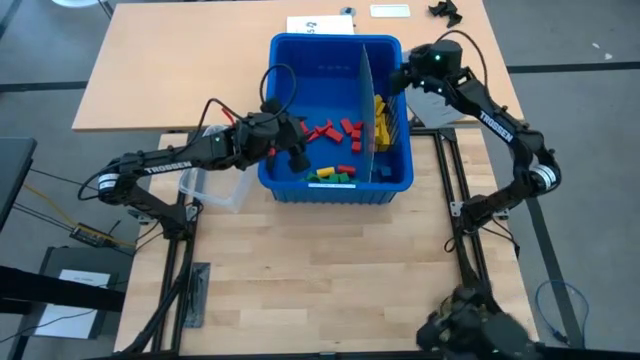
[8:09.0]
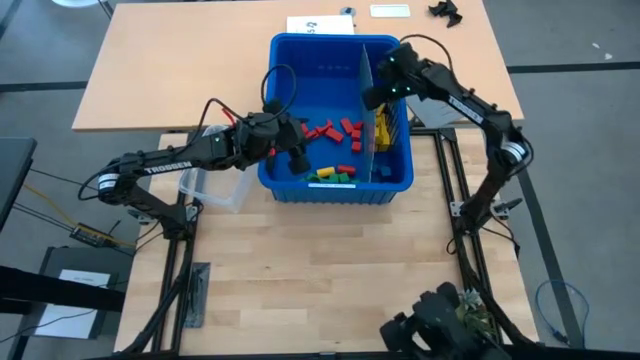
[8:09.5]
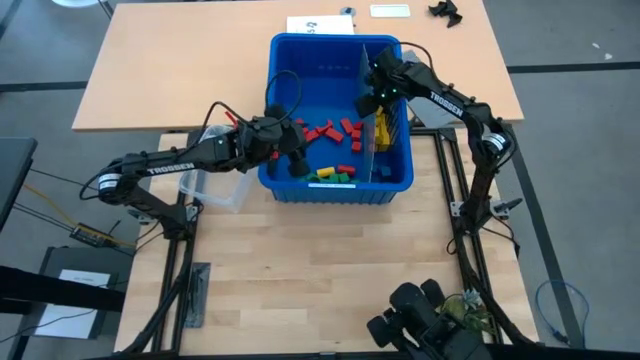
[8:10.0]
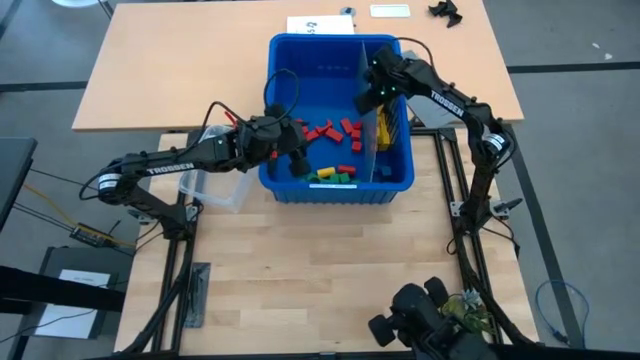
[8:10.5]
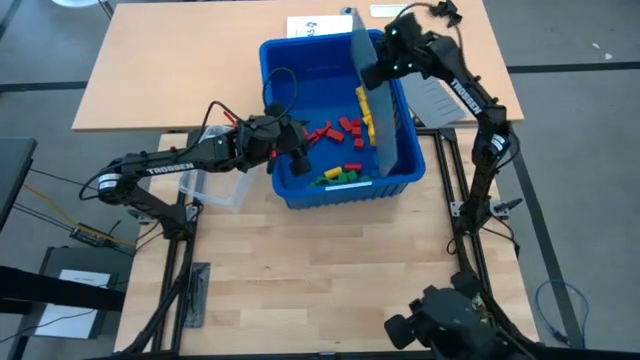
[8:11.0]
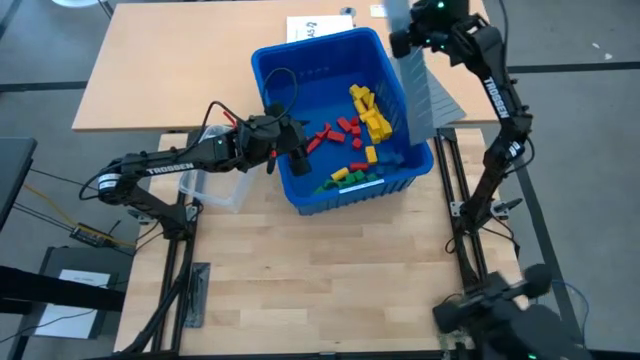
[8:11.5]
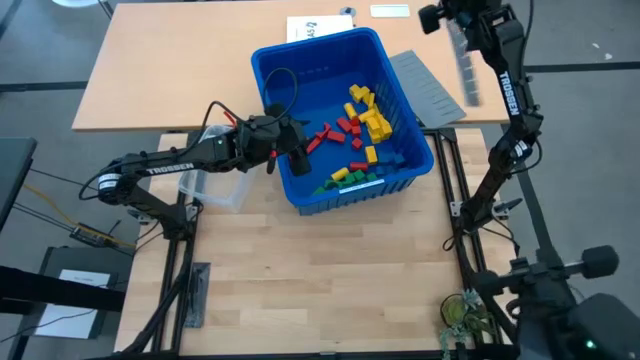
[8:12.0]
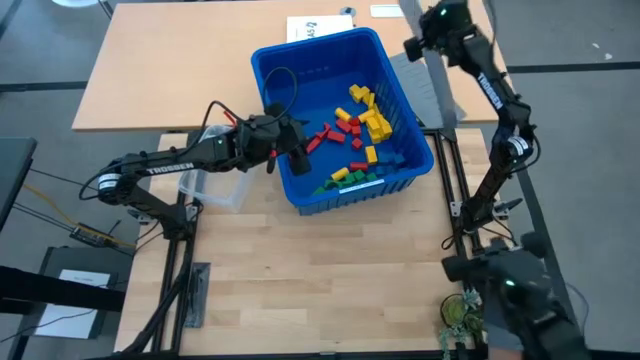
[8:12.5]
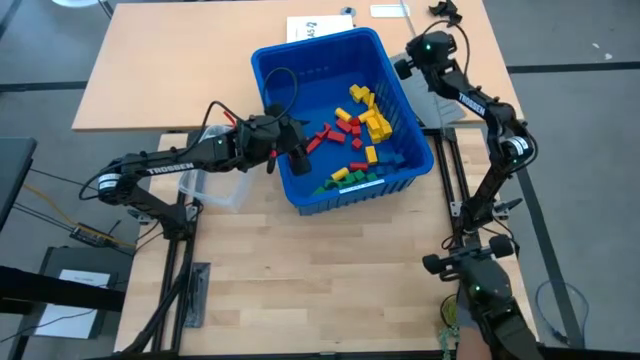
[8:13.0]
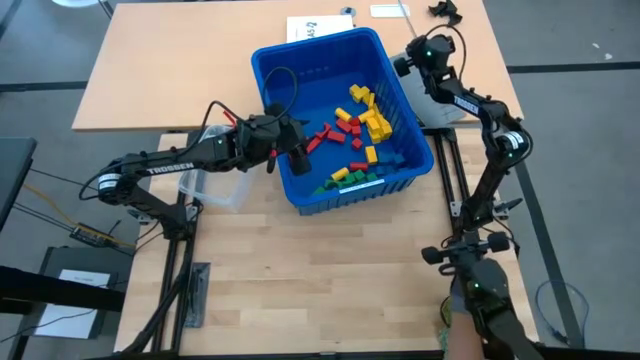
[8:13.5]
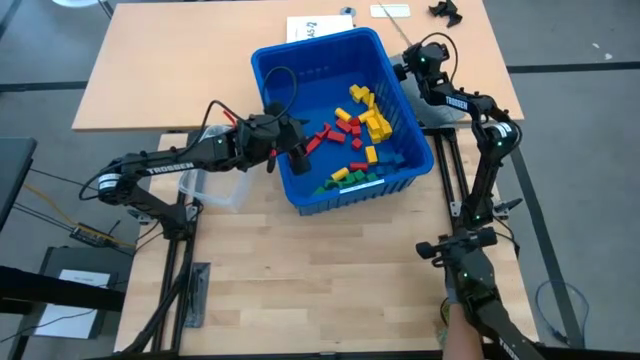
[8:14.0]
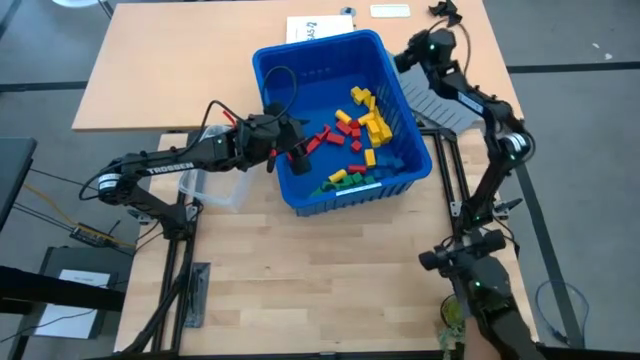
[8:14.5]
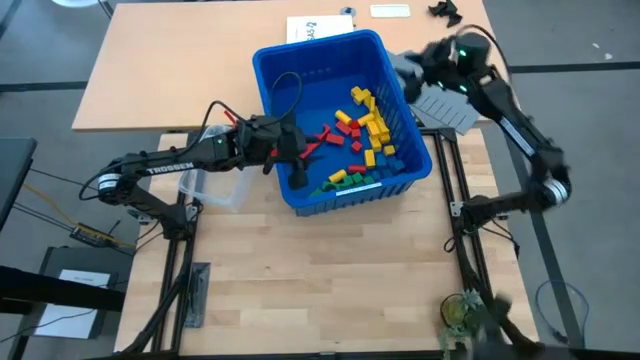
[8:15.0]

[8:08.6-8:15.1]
Task: Sort blocks
Remove the bin divider

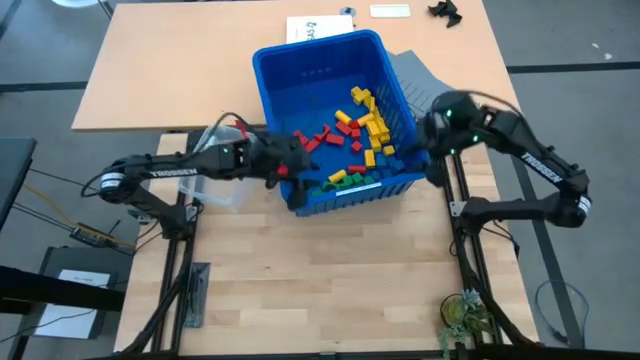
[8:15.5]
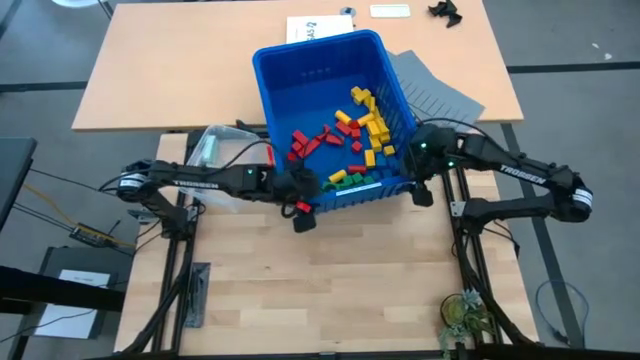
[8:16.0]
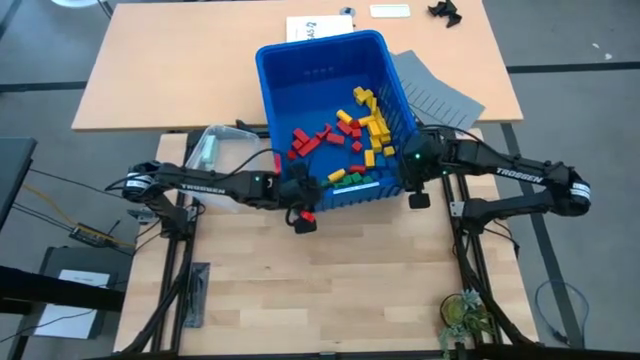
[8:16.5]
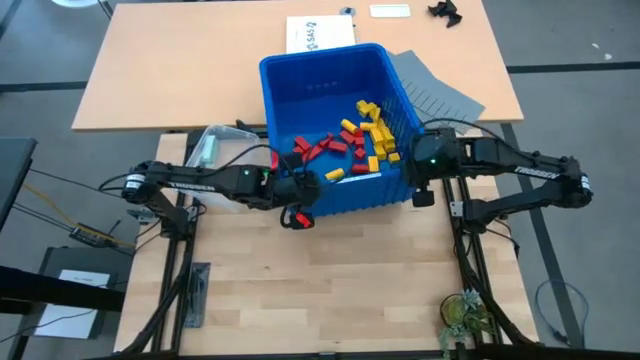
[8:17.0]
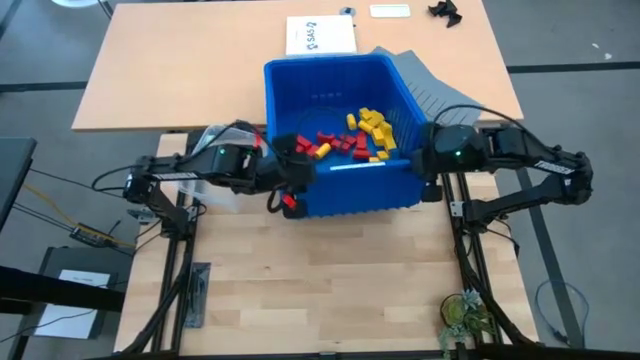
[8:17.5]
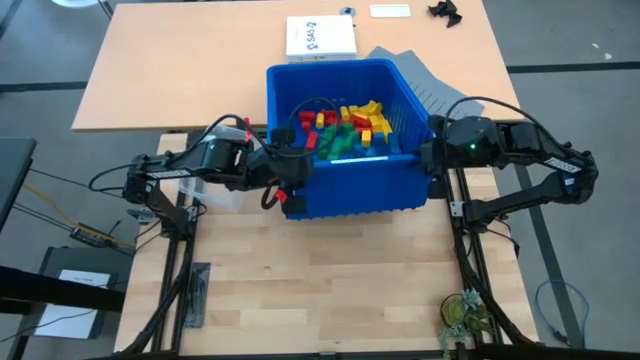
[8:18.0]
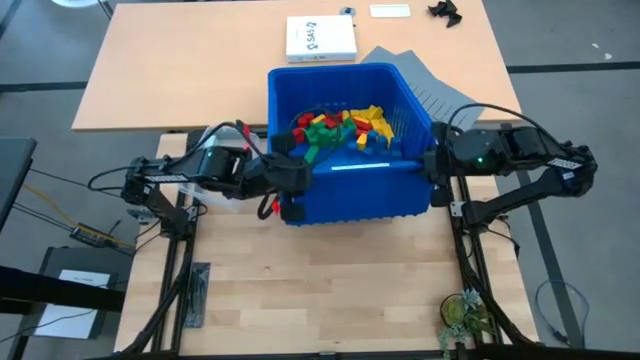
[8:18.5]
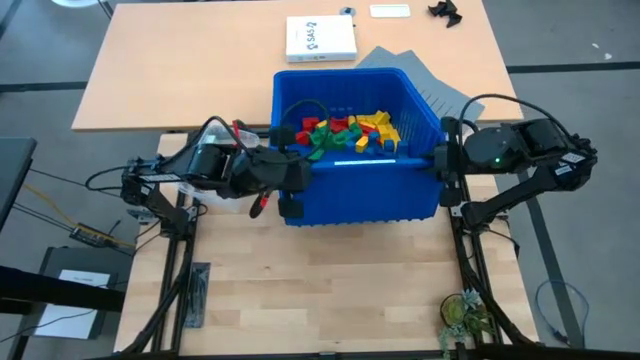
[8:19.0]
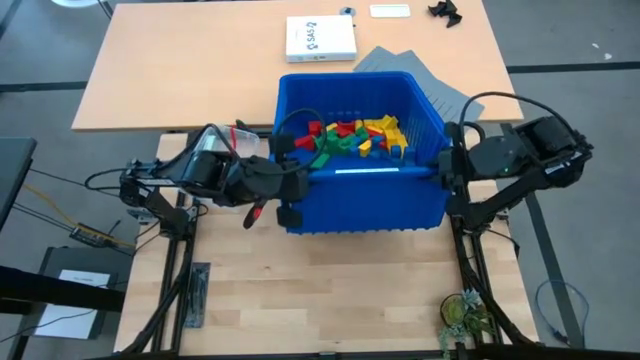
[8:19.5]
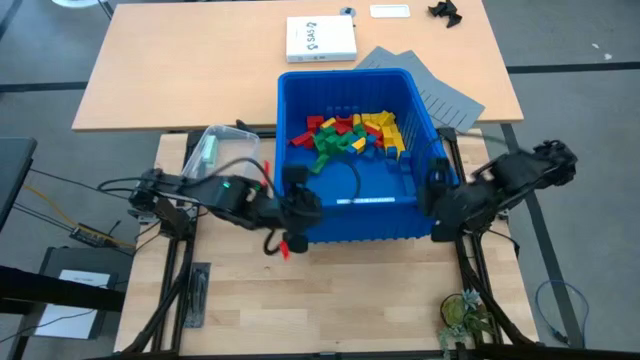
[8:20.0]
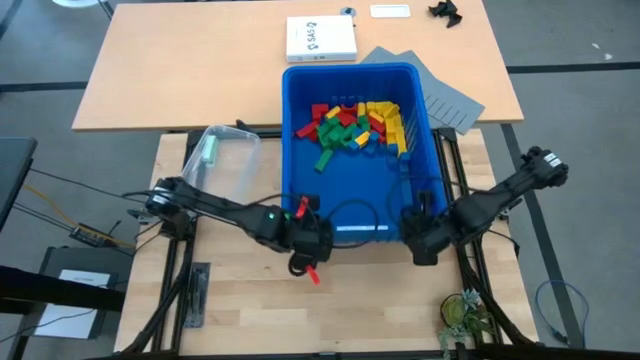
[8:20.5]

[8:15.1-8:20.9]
Adjust the blue bin

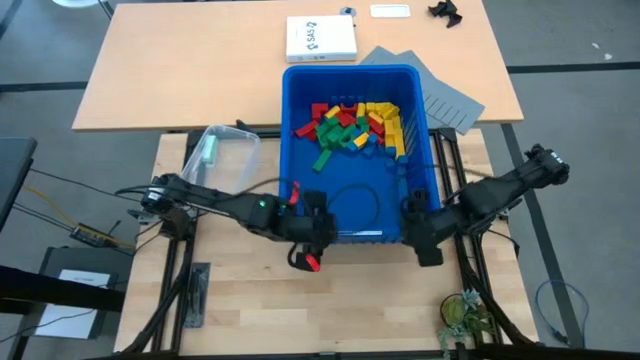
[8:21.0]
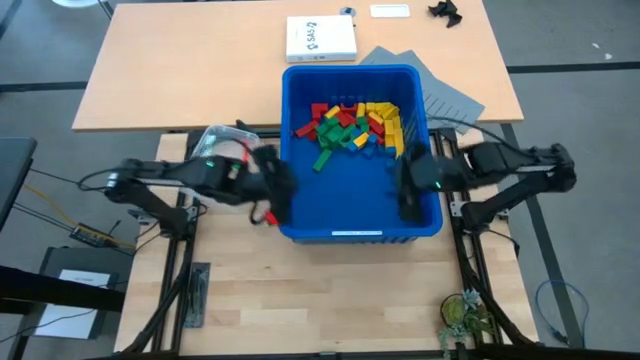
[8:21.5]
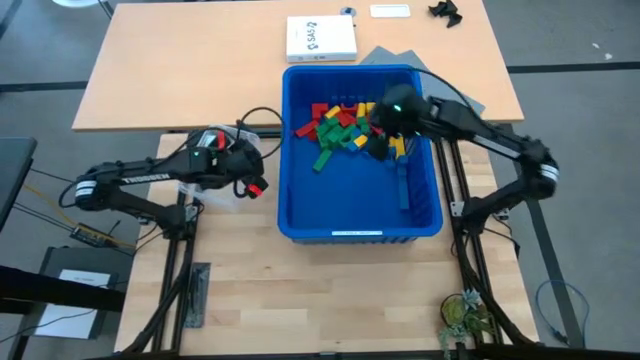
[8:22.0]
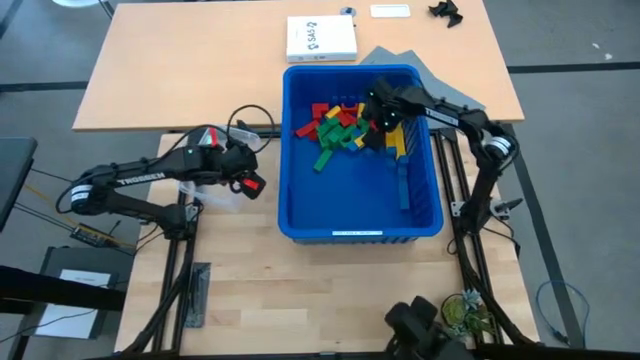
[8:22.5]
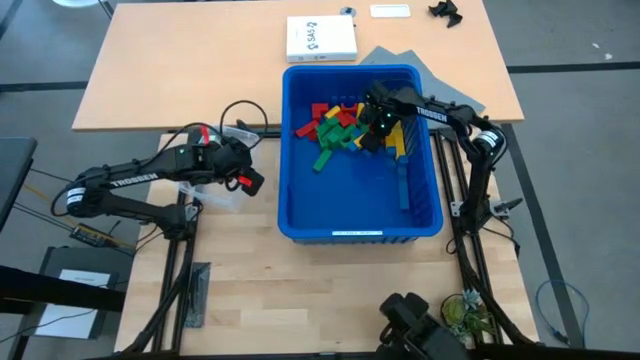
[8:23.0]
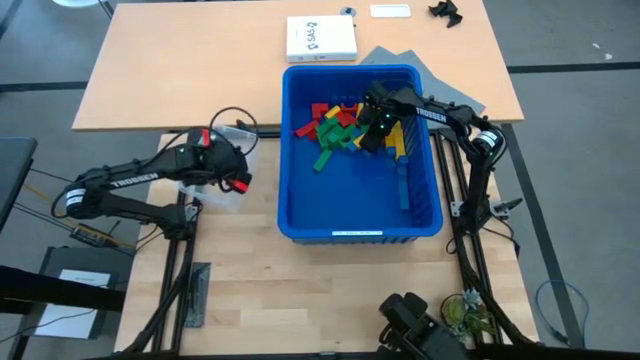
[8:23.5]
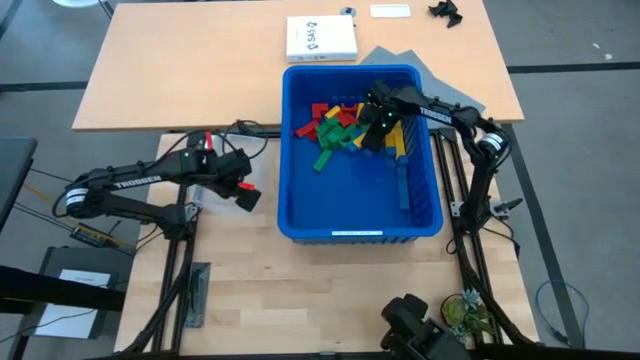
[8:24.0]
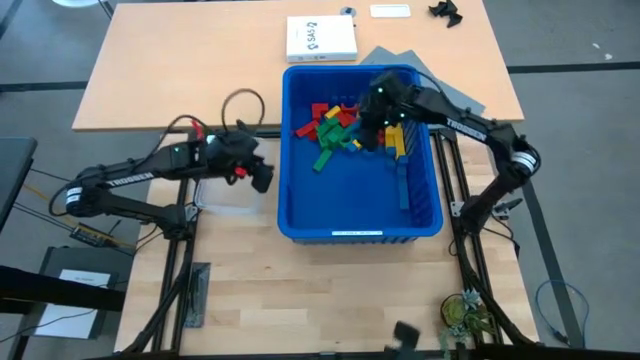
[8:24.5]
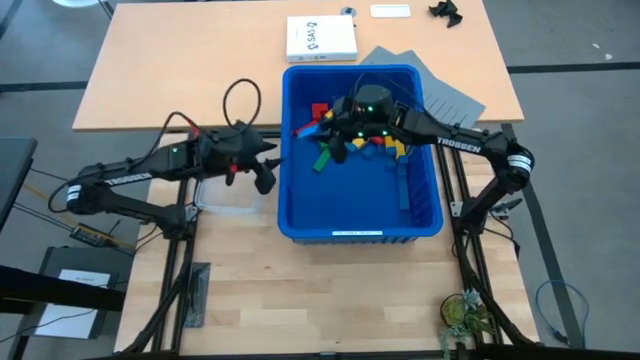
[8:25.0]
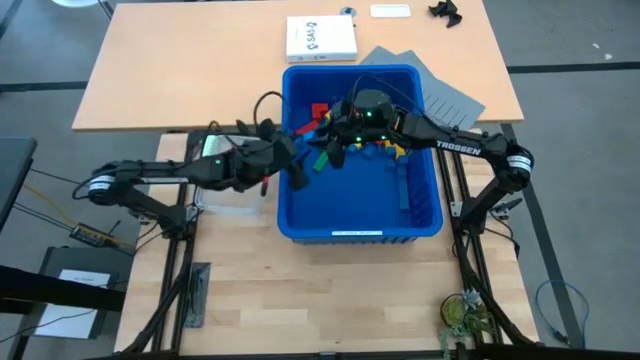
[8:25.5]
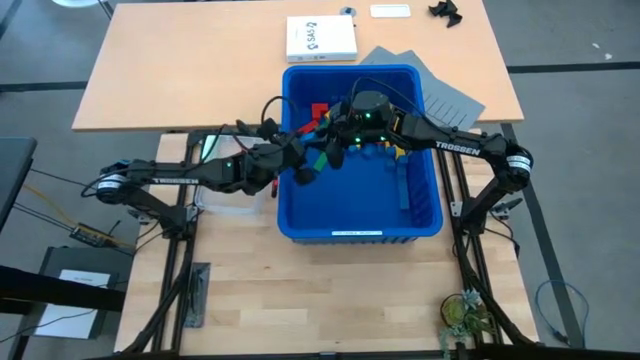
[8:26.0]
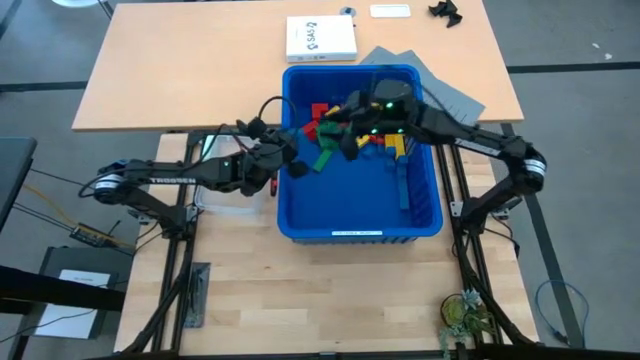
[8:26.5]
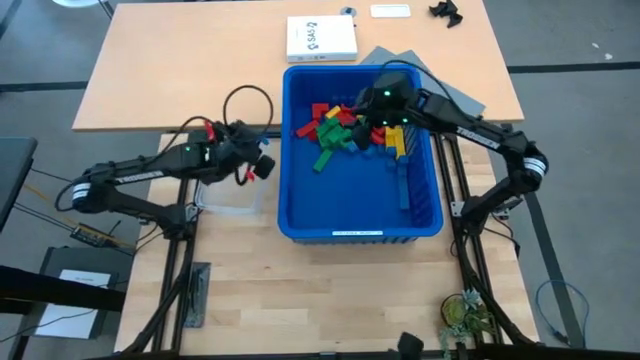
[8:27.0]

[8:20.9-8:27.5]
Remove the blue block from the blue bin and place it into the transparent bin

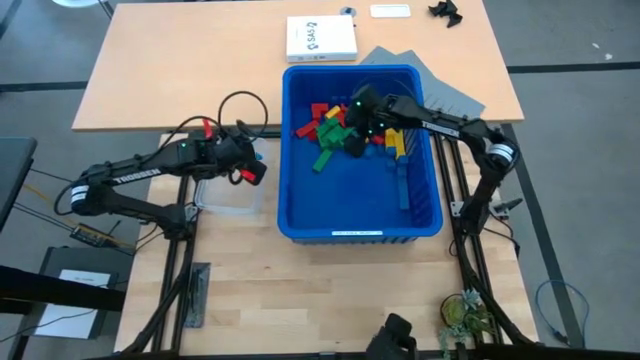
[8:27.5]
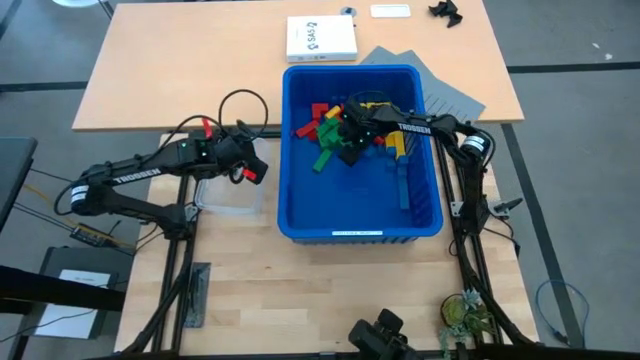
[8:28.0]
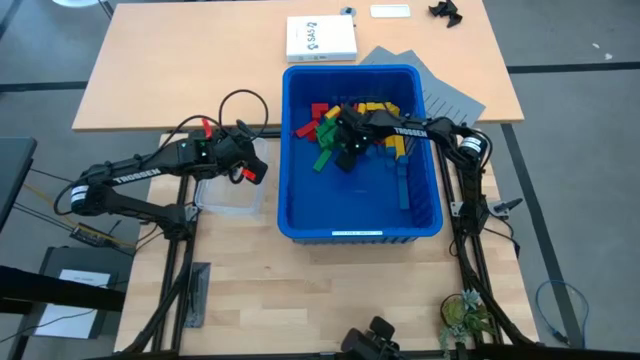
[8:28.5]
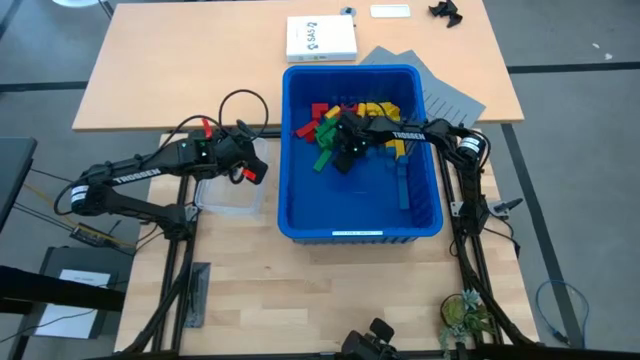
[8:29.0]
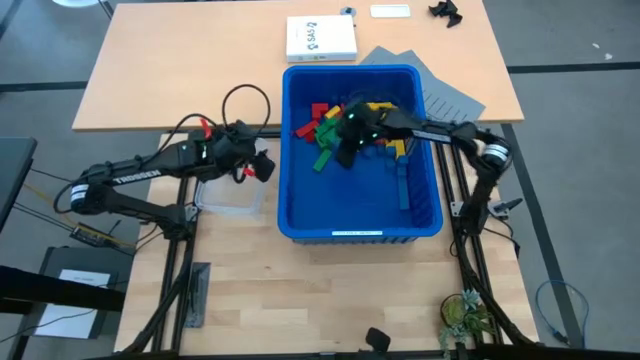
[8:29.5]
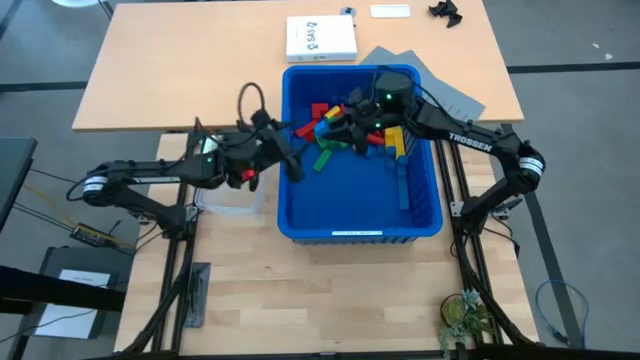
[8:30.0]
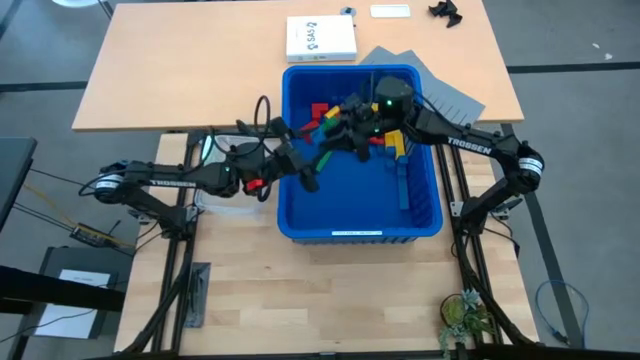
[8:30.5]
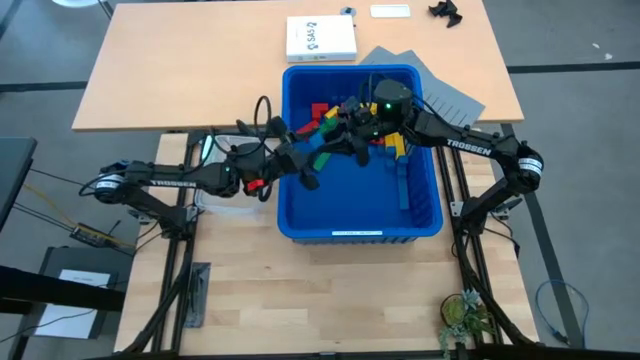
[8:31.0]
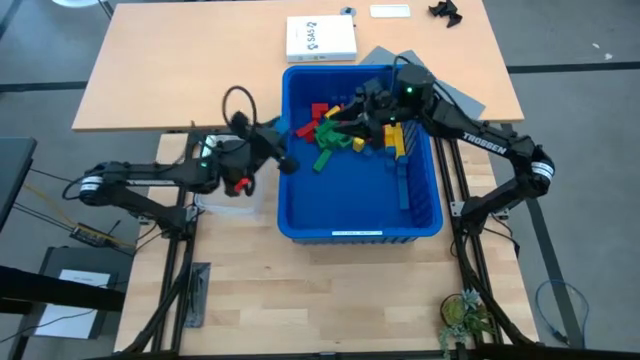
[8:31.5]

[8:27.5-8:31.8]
Put the blue block into the transparent bin
